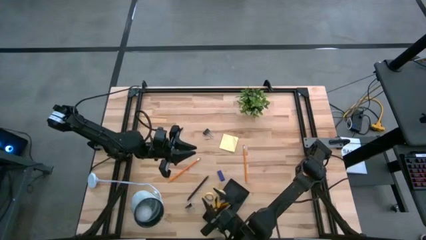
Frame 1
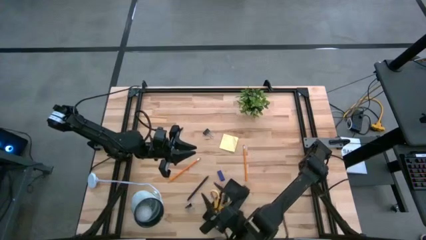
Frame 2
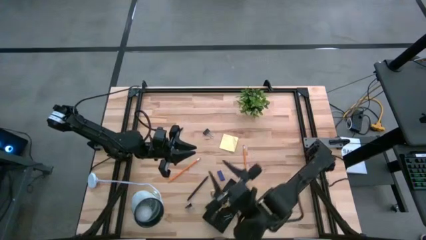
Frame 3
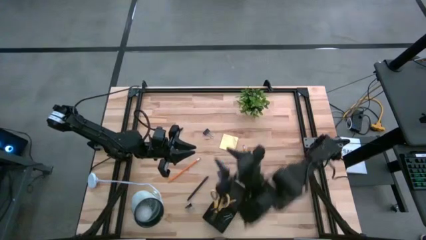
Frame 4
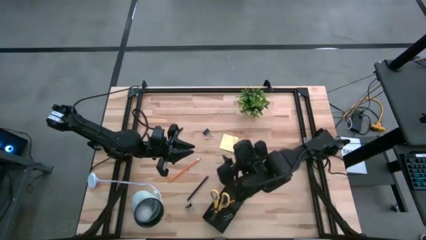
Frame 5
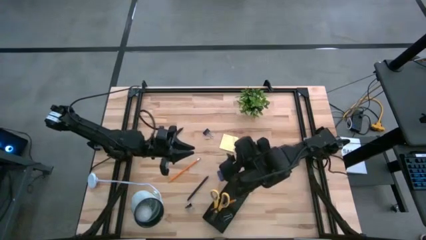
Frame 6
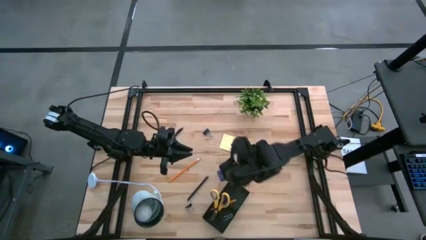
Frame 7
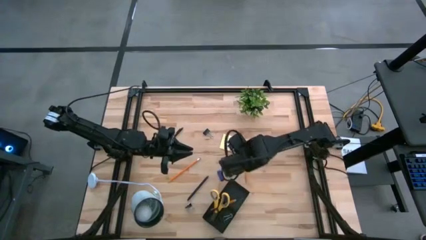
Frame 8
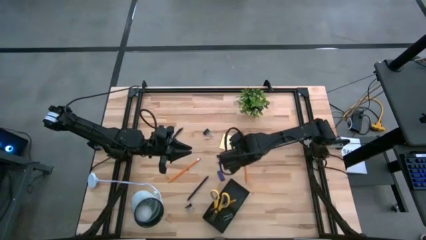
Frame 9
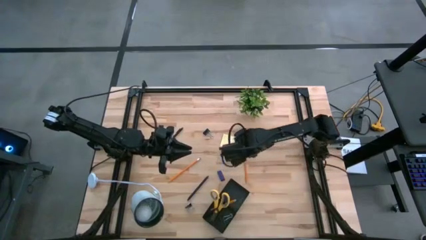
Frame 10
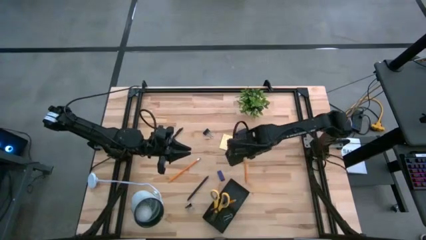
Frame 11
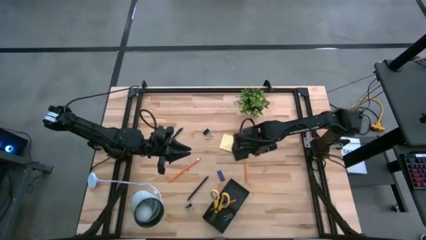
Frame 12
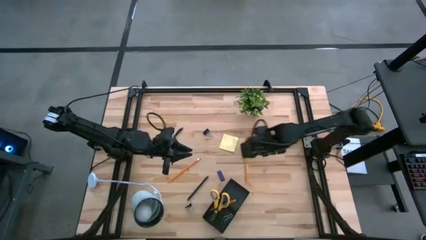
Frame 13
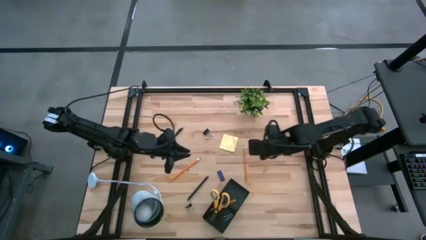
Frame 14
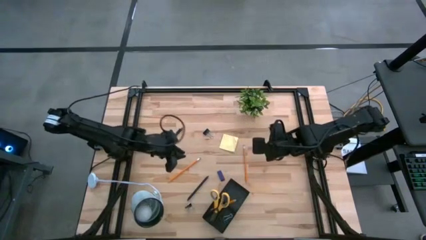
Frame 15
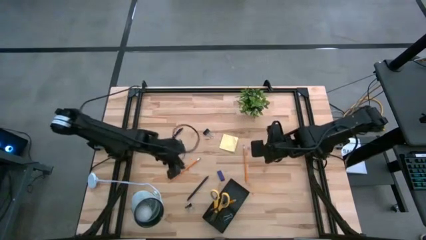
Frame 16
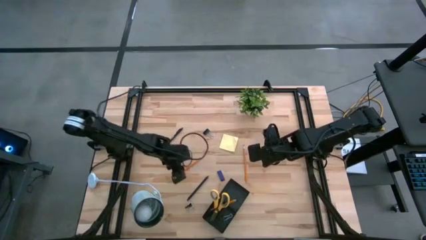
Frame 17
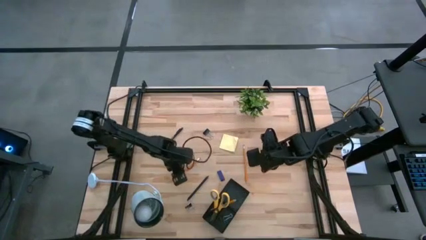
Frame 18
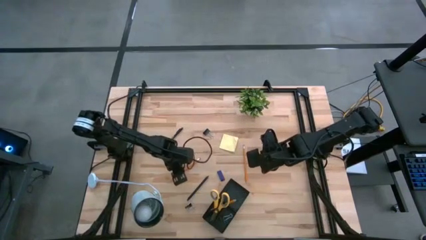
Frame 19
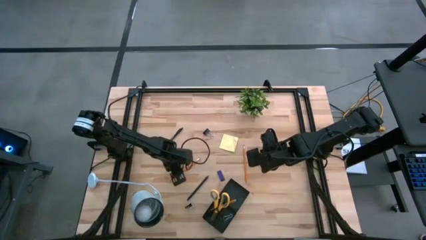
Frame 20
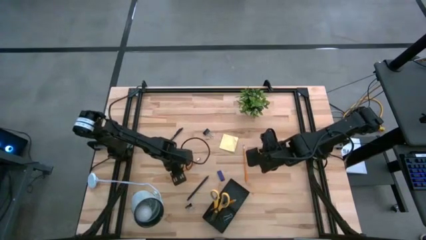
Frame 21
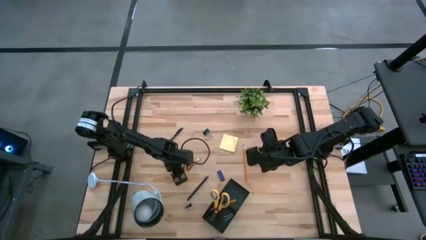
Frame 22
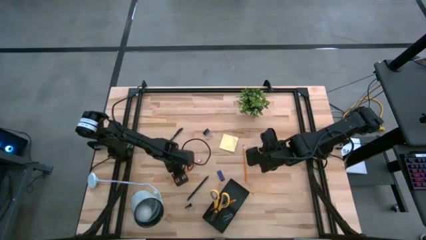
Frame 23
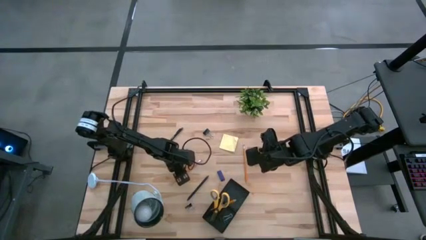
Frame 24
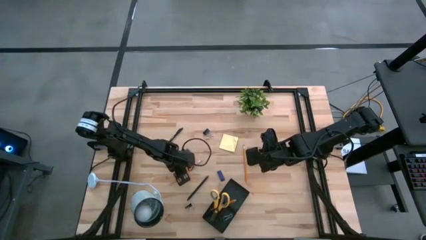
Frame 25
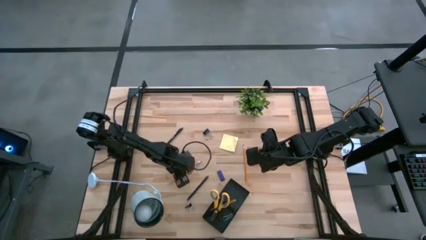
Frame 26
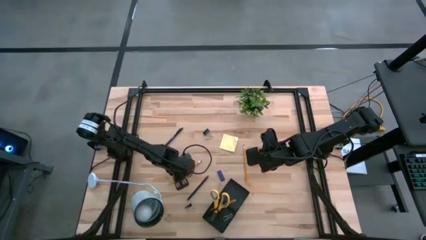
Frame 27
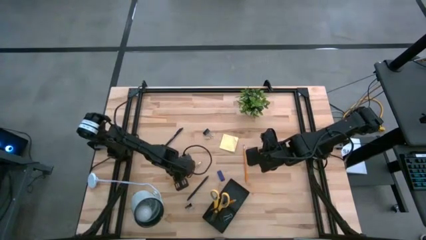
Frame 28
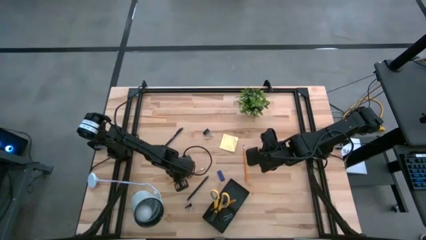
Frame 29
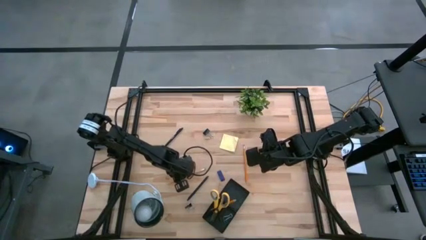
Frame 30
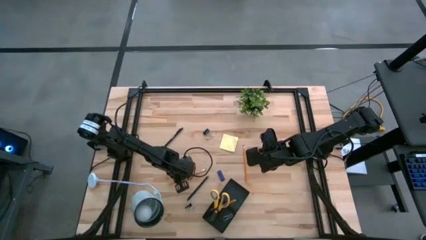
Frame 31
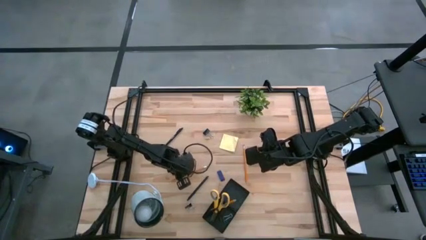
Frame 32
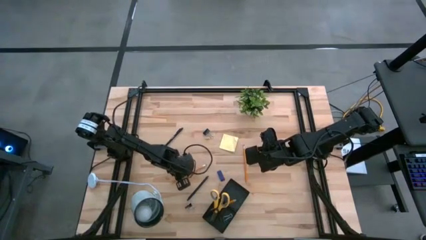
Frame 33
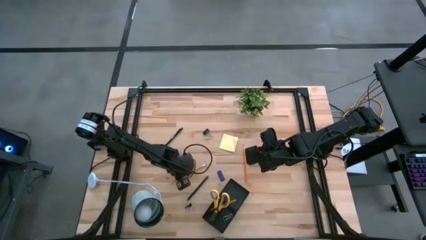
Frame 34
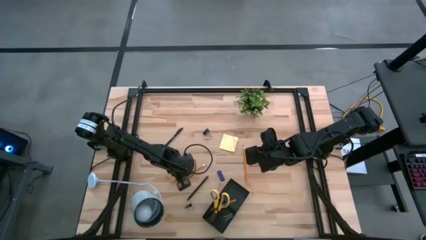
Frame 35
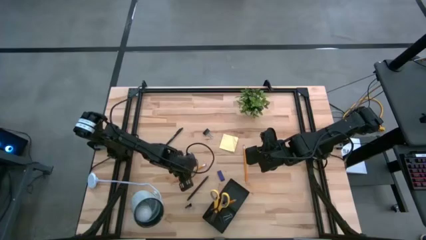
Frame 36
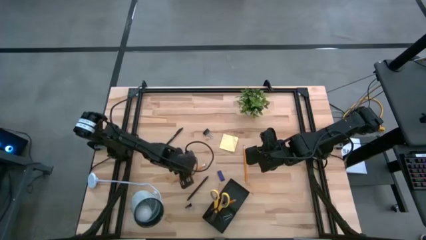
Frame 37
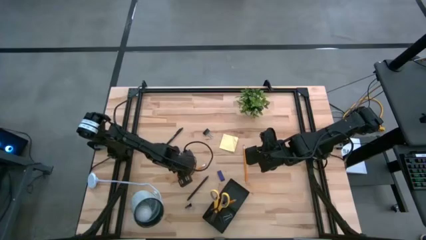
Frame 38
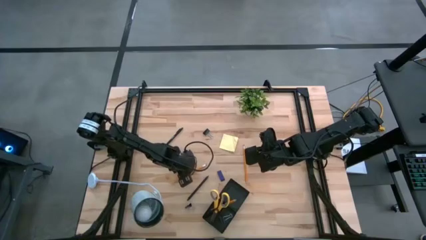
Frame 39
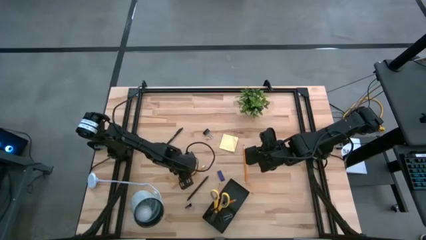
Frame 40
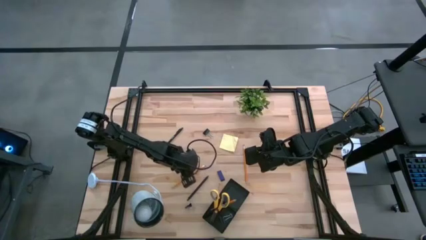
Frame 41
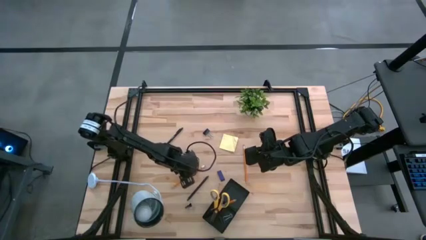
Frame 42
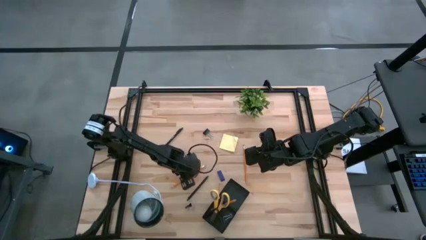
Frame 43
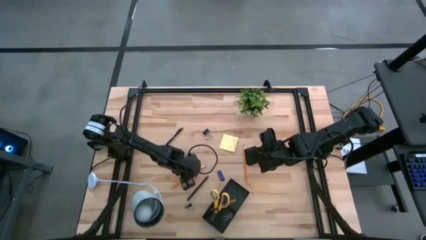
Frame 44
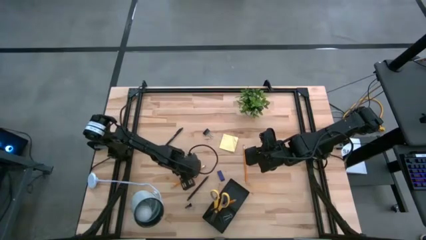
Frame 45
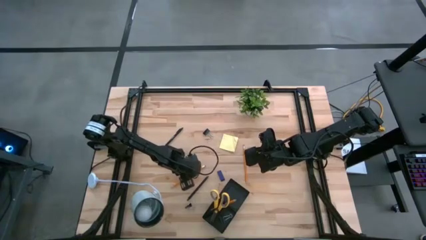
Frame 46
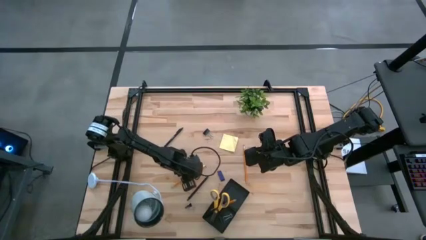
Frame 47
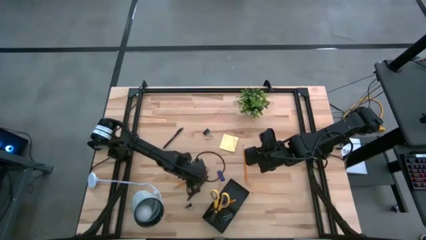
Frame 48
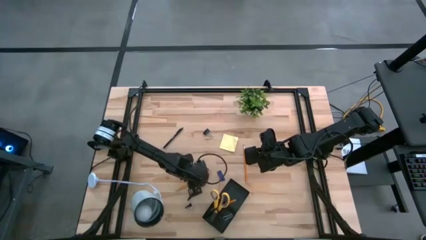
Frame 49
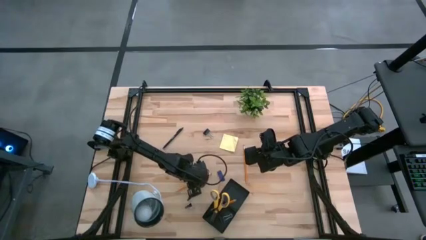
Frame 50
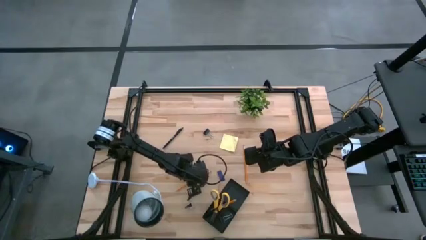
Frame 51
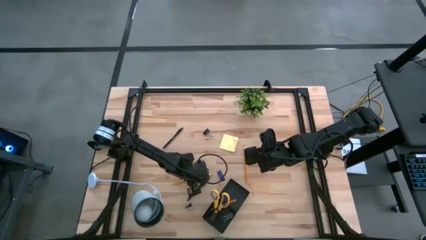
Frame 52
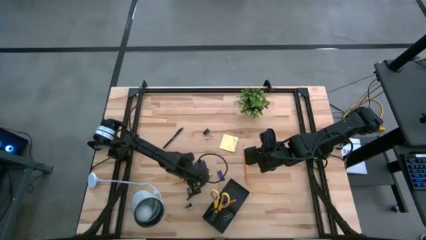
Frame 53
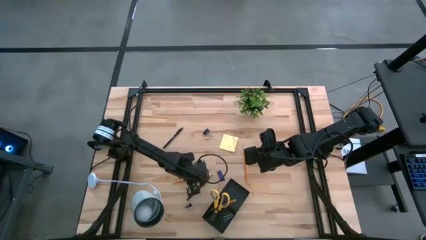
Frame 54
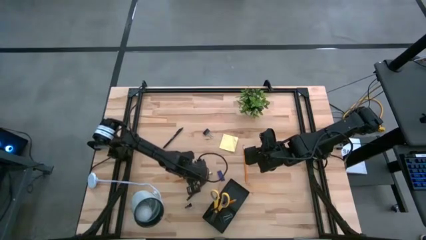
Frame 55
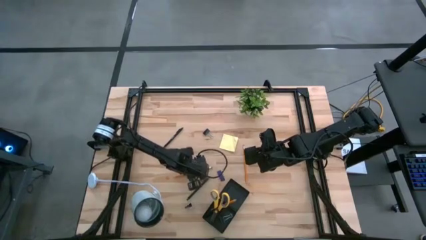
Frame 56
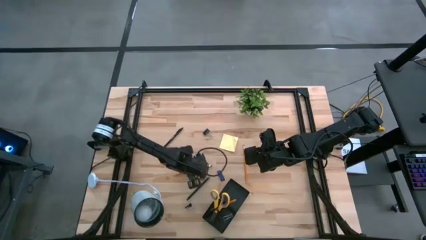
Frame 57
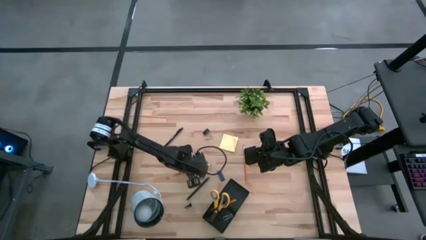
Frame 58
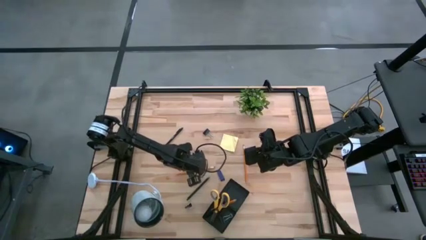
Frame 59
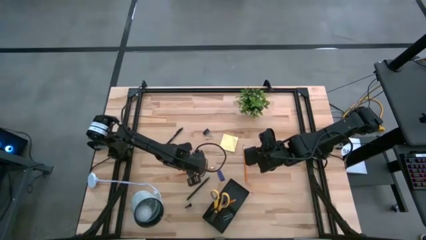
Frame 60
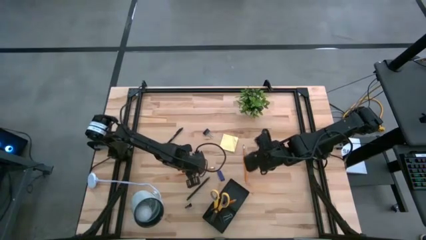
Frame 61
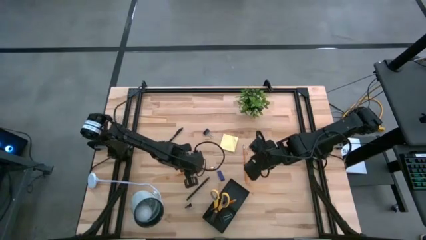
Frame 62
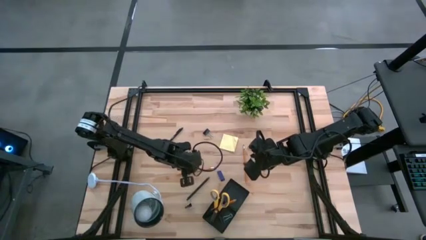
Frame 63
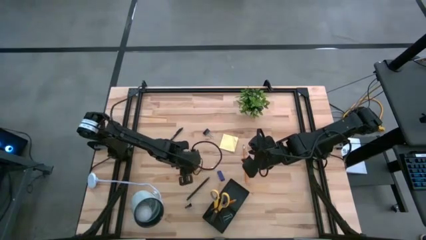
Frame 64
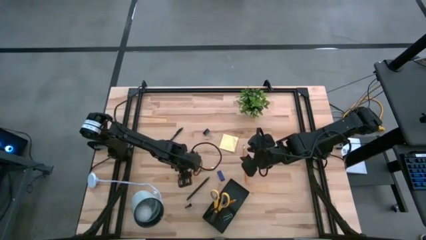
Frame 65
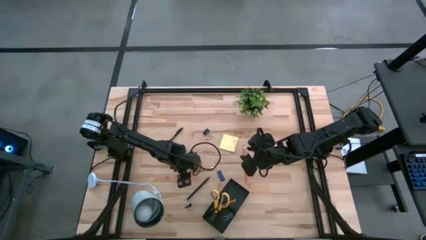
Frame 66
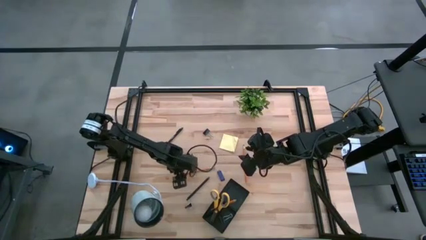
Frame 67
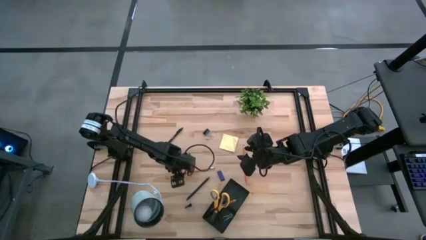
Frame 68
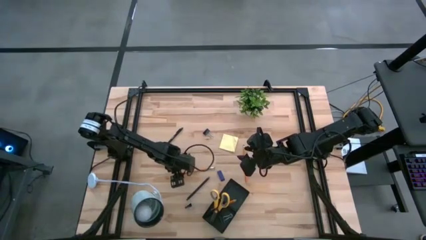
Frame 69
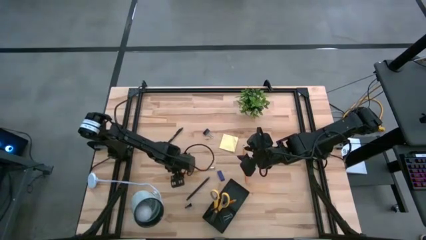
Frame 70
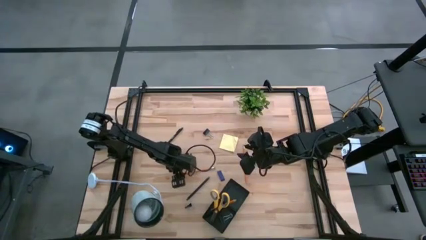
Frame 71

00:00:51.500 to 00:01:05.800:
Task: Pick and place office supplies into organizer
Put the left pencil into the desk organizer
